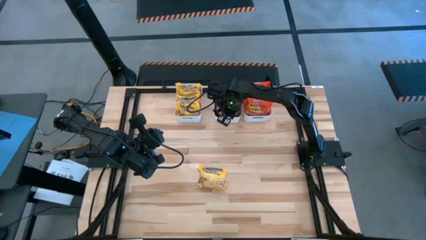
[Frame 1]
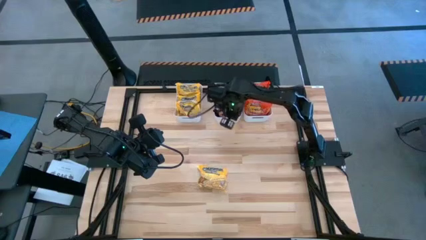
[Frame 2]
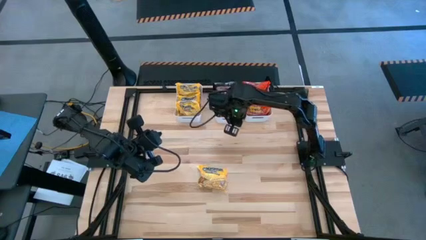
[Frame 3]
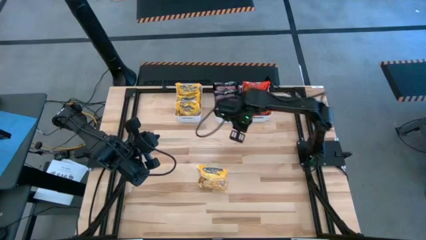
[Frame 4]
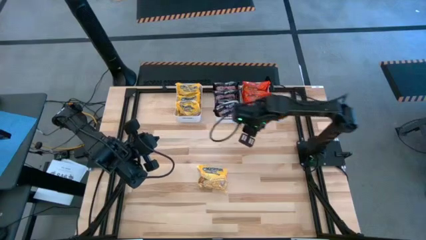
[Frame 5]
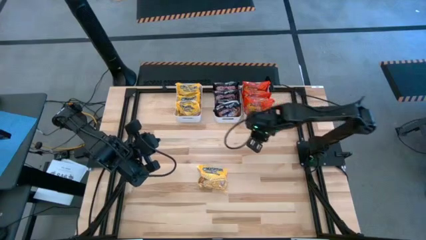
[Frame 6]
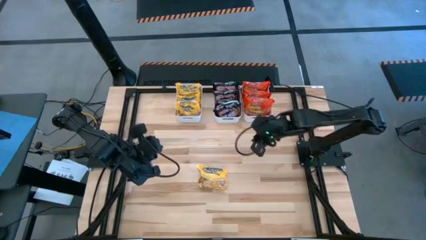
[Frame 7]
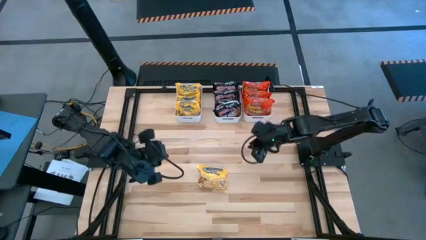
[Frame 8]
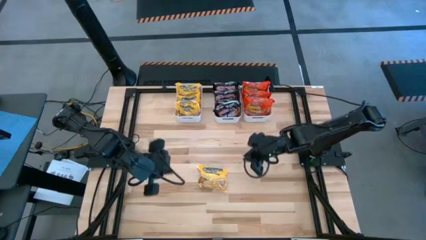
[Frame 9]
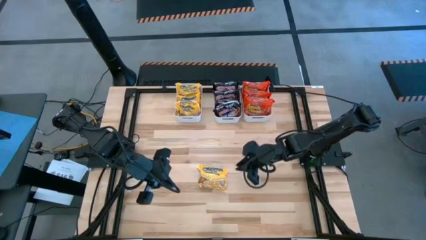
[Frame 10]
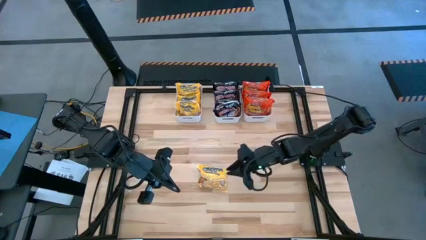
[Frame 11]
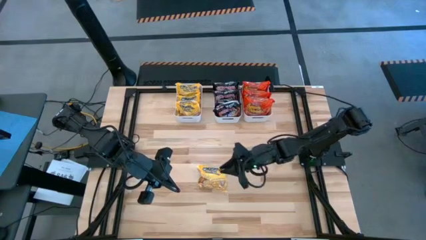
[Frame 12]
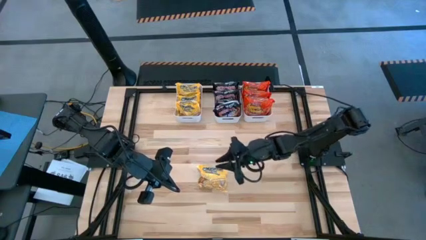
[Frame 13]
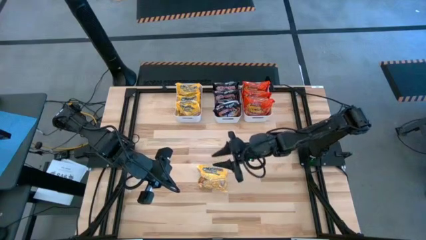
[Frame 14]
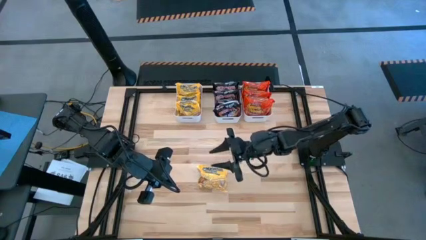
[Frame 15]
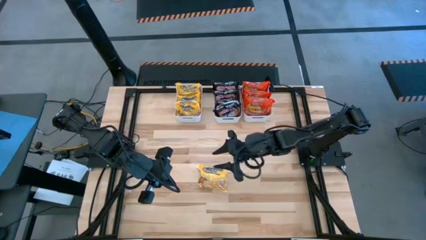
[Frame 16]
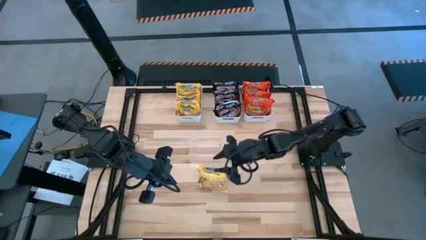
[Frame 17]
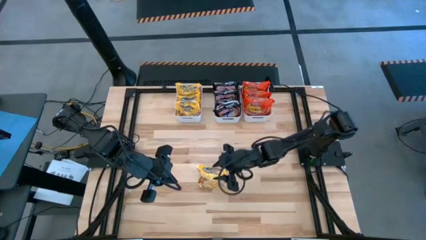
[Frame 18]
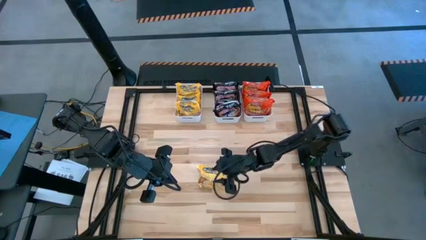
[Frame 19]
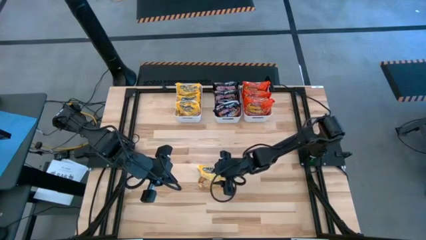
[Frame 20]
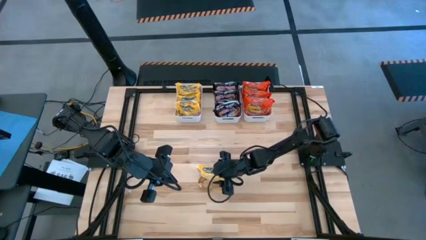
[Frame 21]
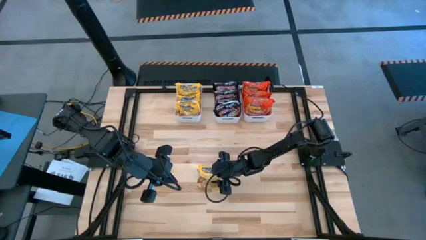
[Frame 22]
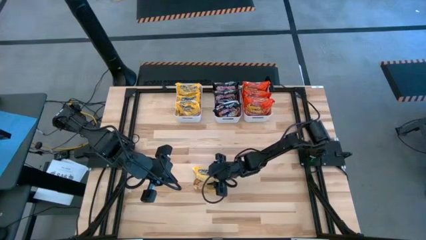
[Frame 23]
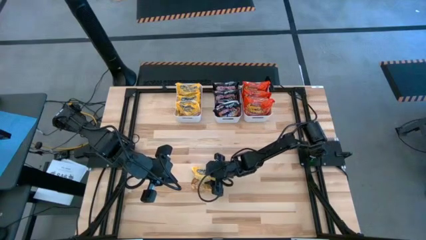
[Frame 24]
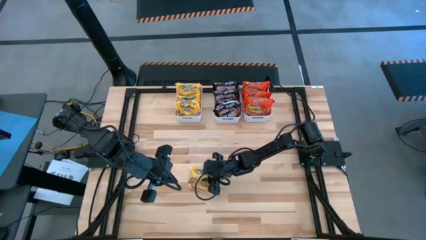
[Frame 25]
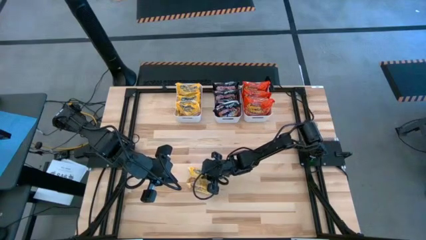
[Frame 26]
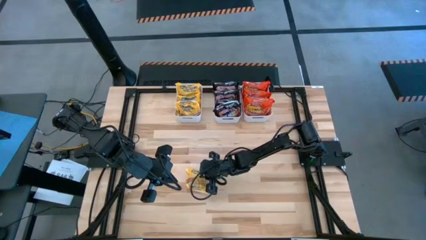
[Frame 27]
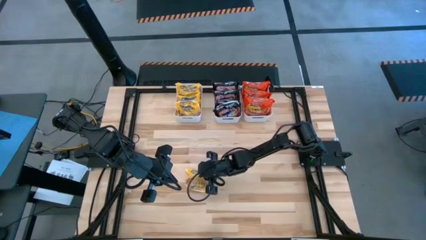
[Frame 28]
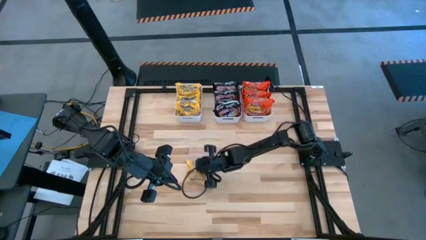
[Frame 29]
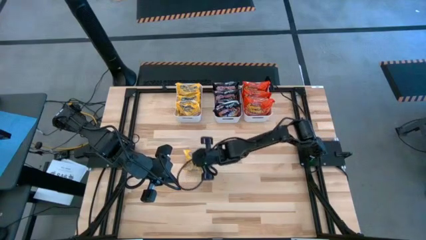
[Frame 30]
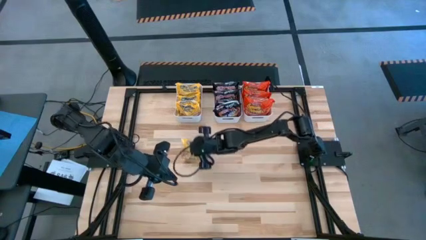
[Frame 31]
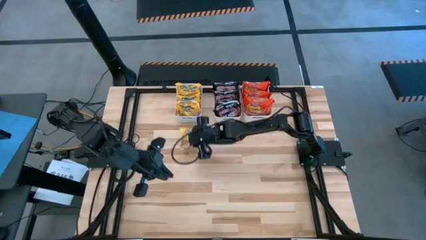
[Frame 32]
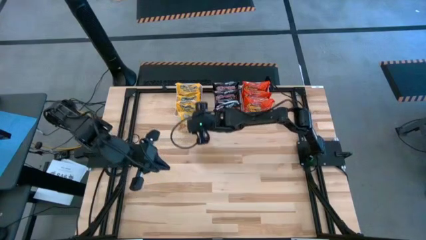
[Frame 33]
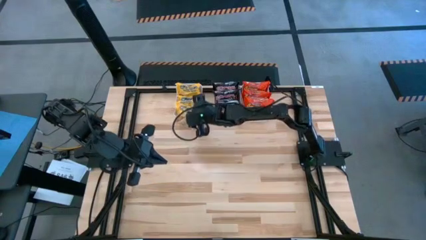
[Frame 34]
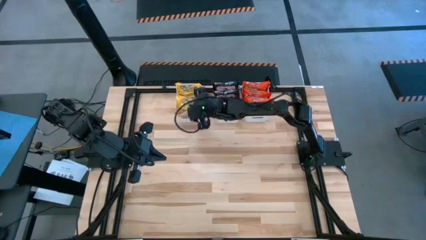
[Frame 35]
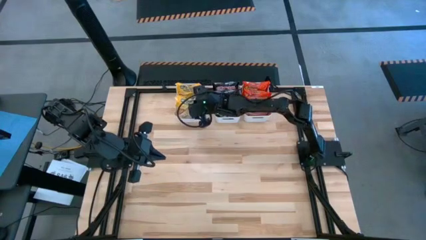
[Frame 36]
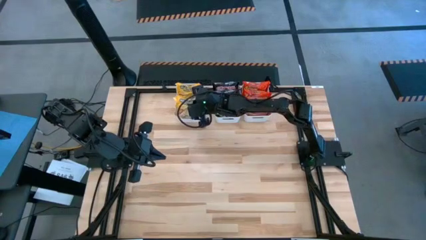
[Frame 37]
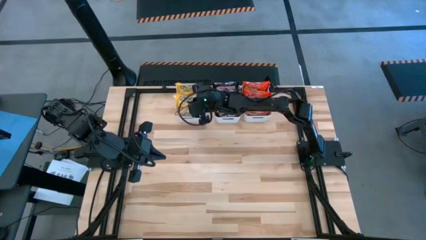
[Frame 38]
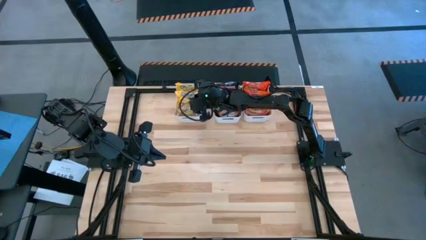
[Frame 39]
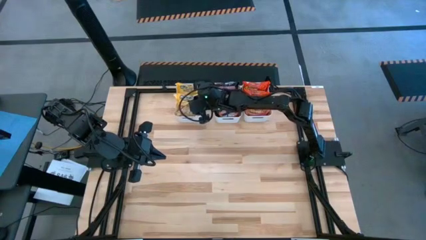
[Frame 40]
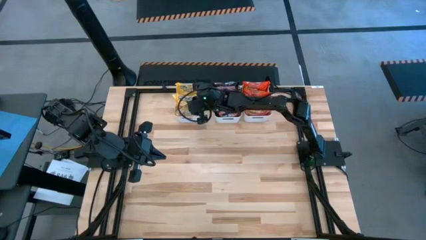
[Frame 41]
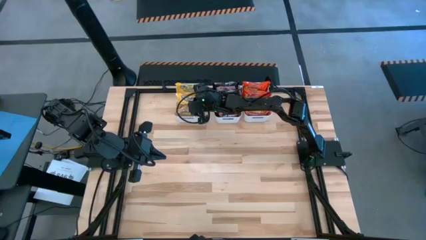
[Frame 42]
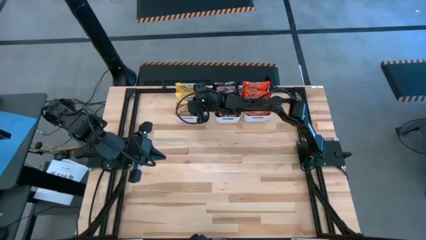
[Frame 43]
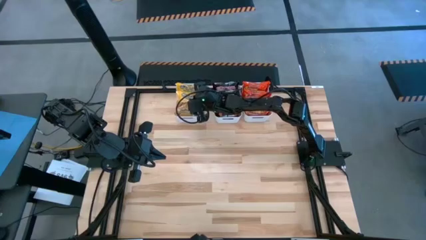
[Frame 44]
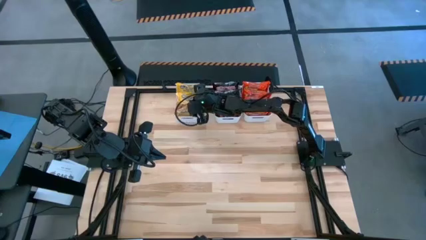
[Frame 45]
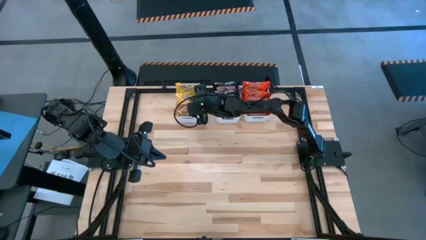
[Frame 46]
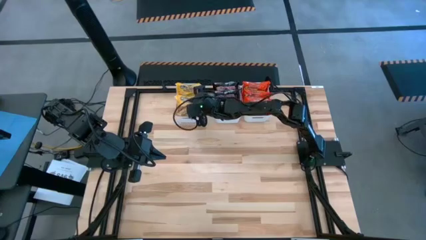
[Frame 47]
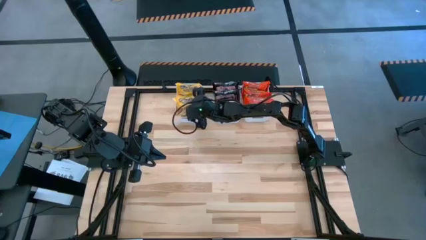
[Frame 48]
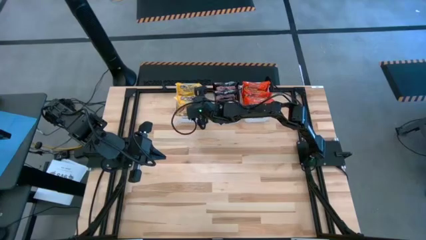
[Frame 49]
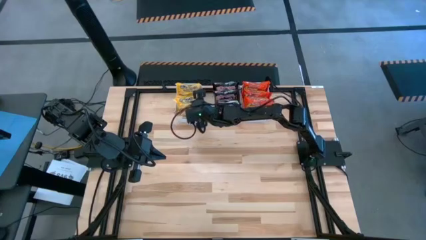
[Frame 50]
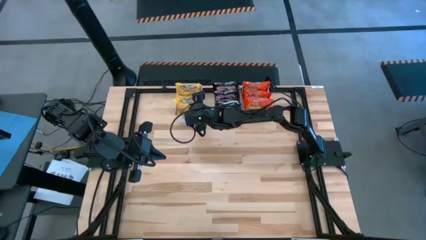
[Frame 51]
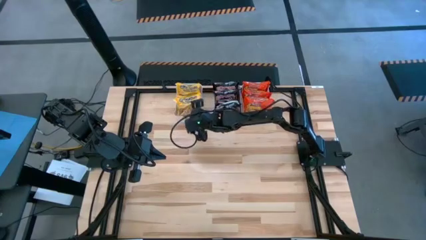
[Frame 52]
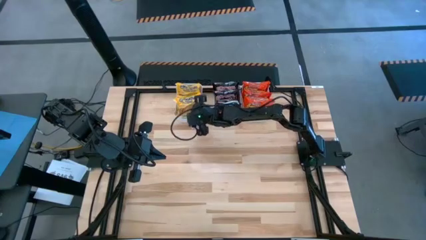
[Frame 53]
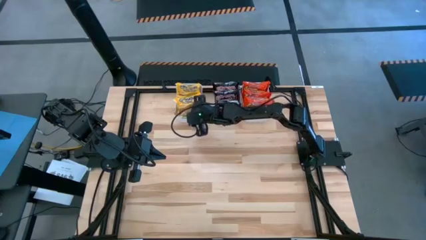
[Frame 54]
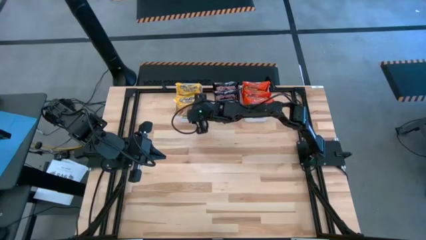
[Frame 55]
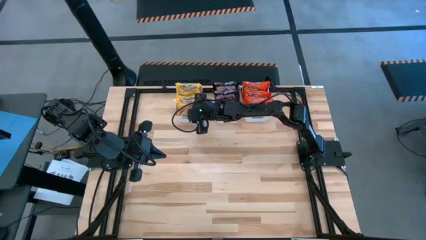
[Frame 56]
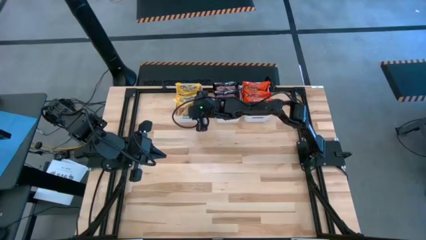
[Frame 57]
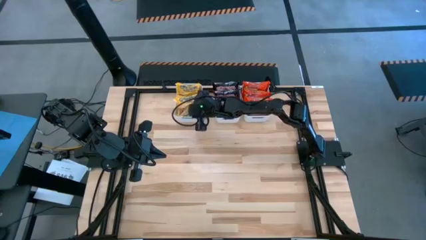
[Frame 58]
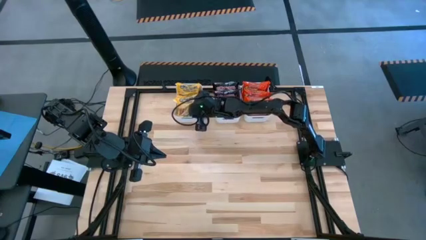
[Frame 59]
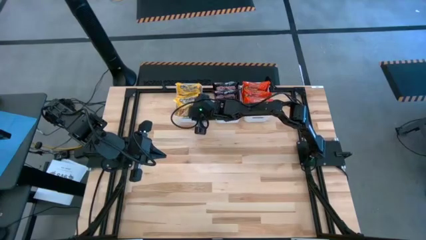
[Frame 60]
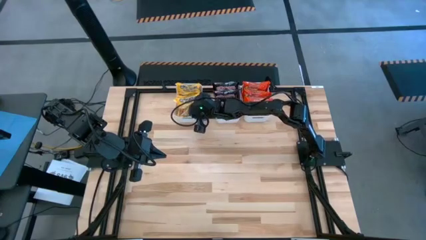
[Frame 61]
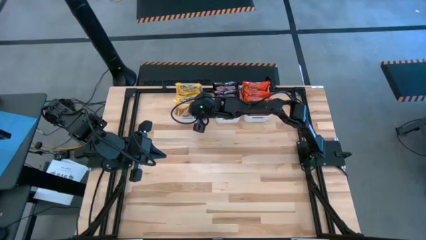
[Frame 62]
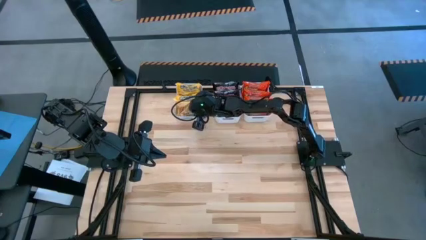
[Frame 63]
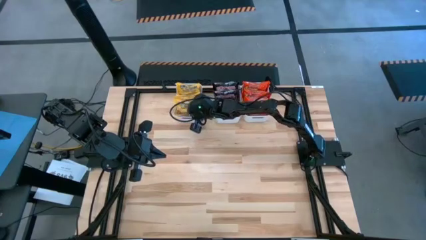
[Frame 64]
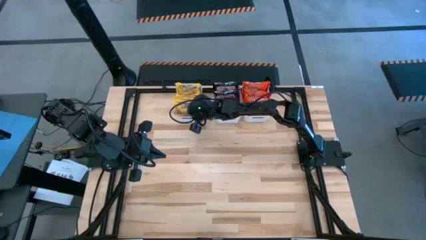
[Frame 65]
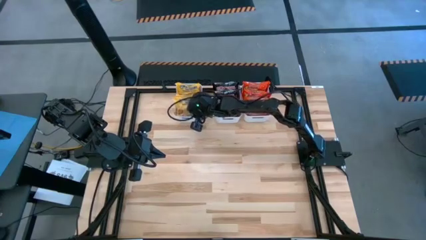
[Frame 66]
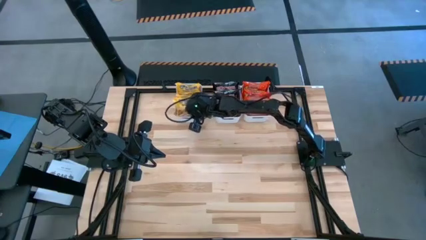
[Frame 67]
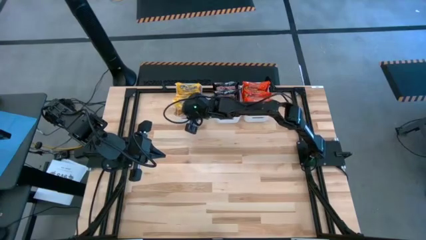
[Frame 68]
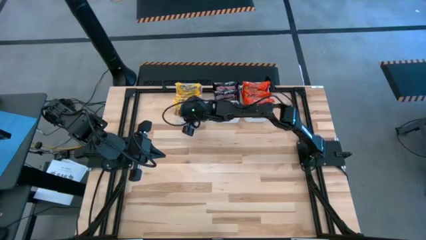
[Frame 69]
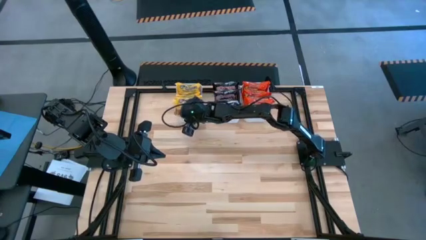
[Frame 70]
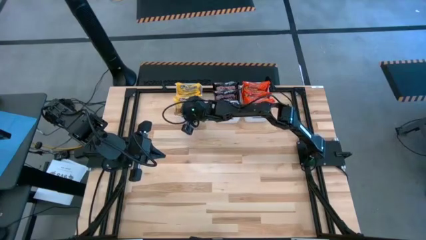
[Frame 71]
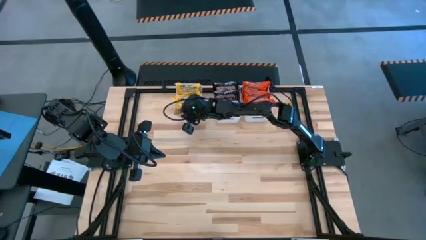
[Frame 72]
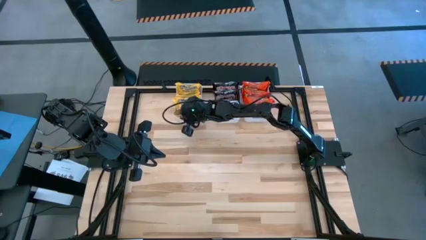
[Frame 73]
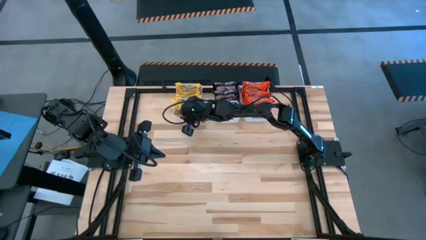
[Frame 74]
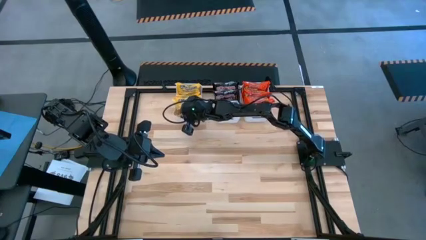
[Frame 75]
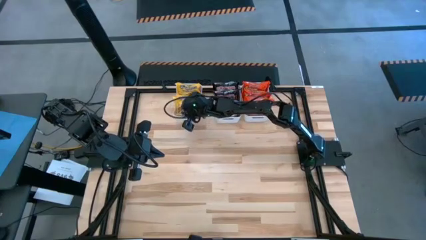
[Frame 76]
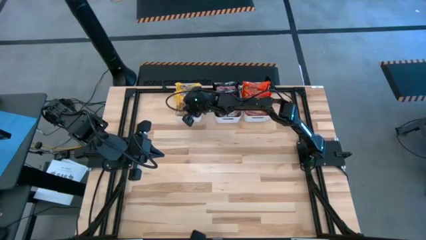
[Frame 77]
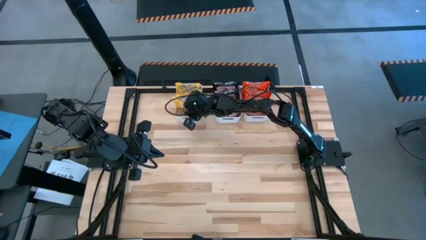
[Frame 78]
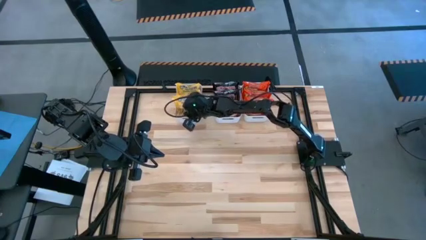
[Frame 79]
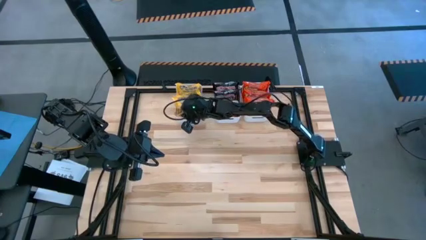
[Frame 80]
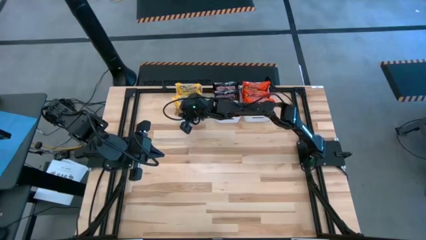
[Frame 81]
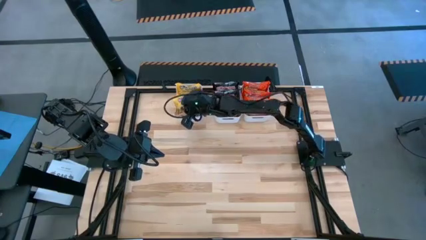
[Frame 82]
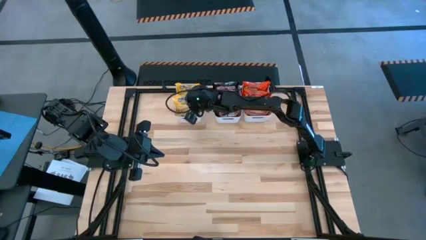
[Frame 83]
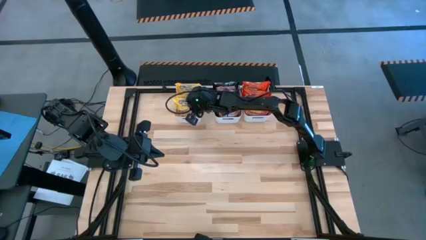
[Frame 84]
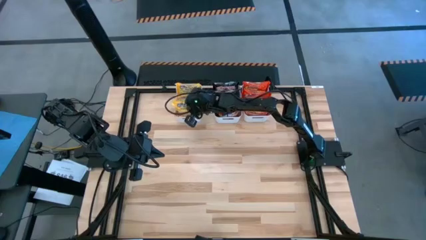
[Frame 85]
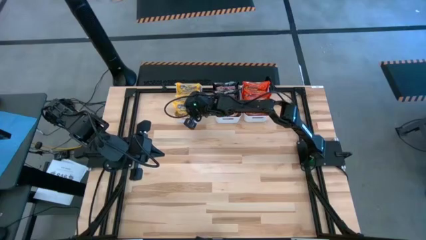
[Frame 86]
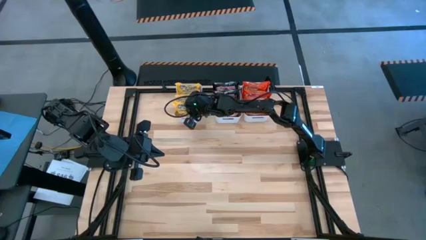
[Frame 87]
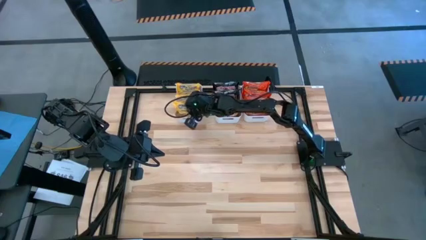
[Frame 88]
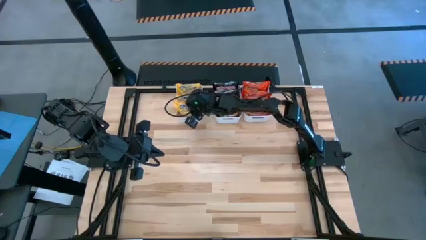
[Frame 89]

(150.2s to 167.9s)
Task: Sort Maruchan noodles
Put the yellow noodle pack into the left white bin
